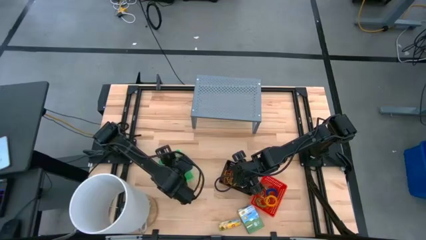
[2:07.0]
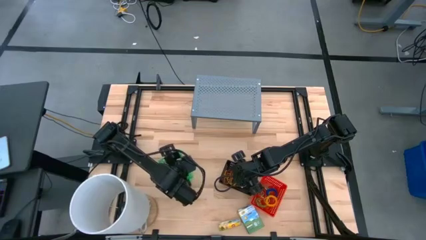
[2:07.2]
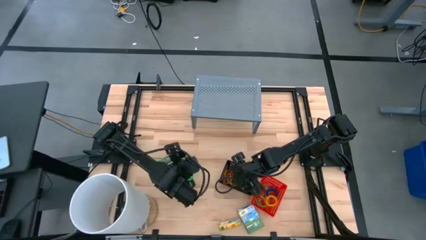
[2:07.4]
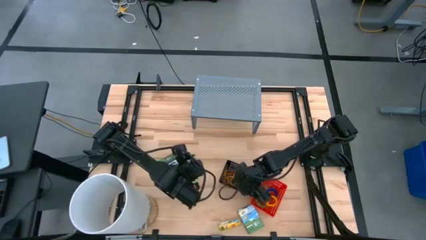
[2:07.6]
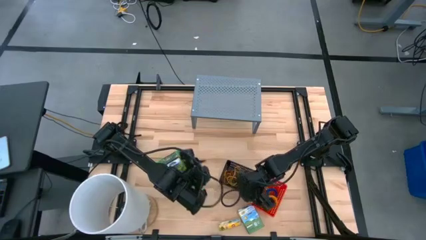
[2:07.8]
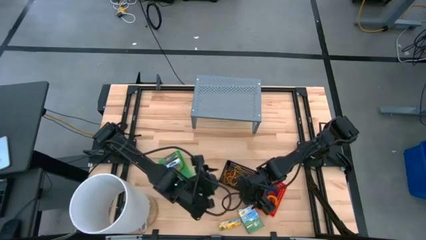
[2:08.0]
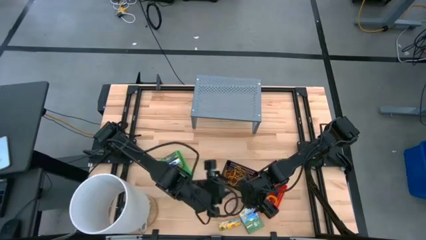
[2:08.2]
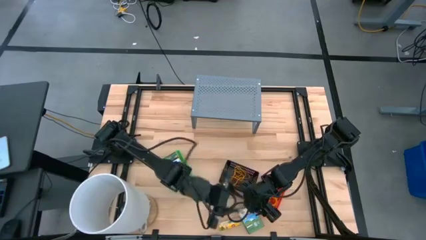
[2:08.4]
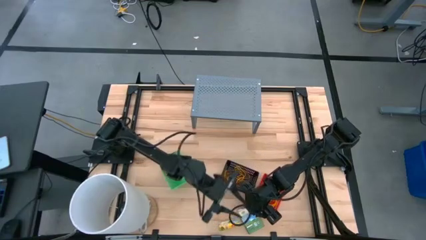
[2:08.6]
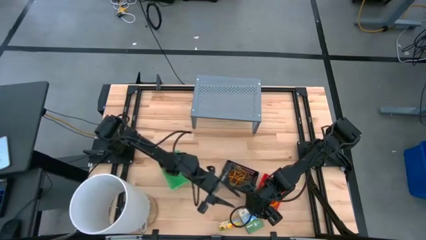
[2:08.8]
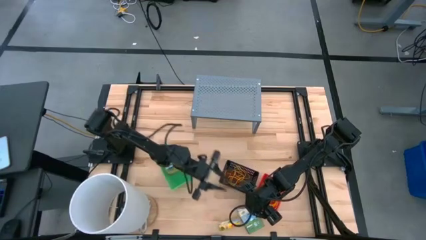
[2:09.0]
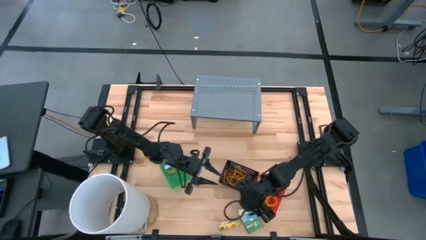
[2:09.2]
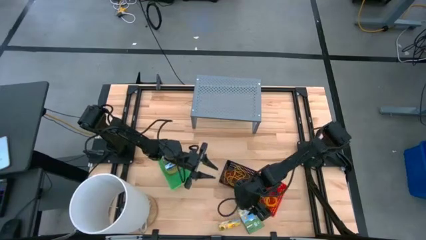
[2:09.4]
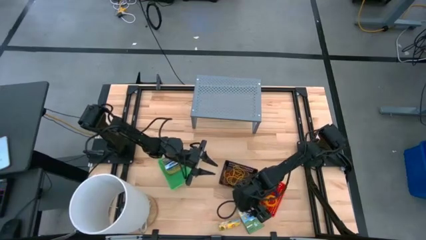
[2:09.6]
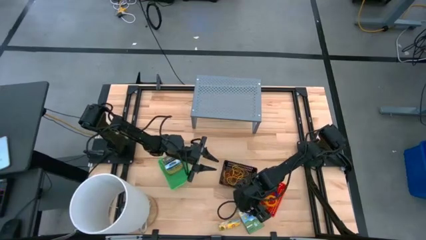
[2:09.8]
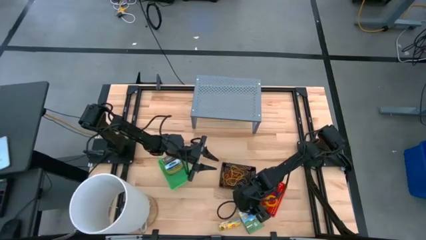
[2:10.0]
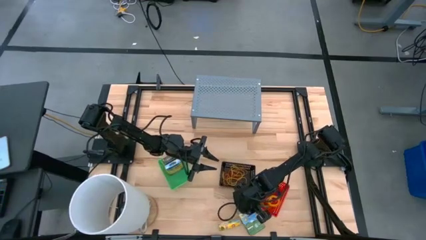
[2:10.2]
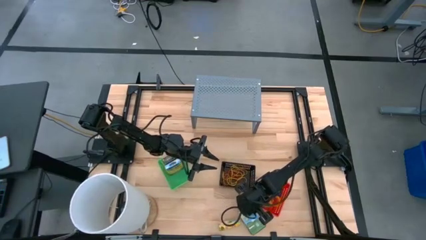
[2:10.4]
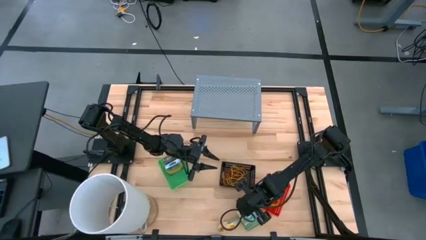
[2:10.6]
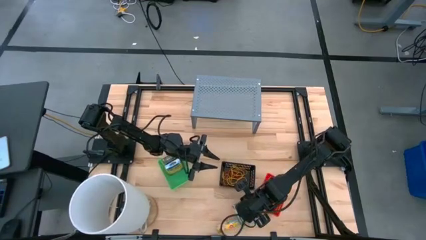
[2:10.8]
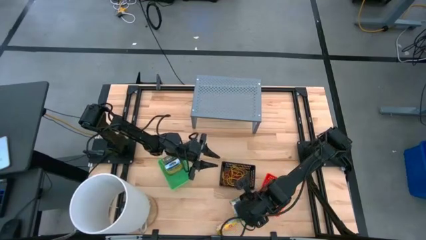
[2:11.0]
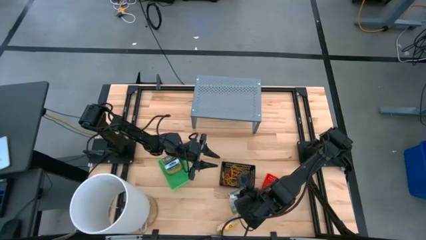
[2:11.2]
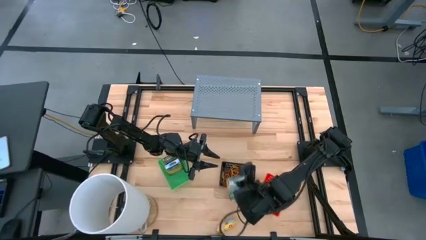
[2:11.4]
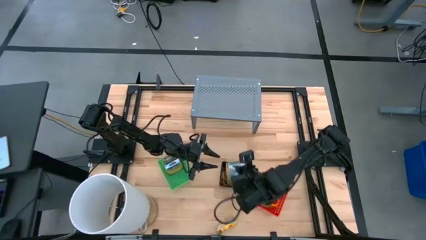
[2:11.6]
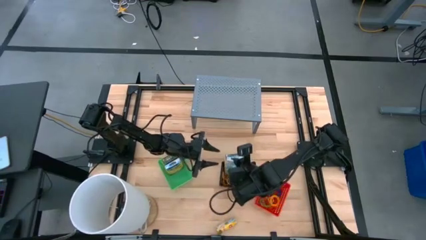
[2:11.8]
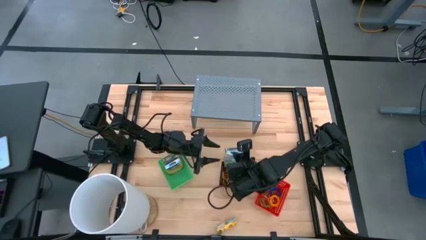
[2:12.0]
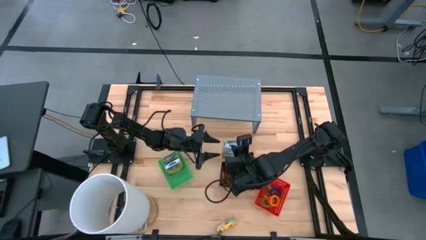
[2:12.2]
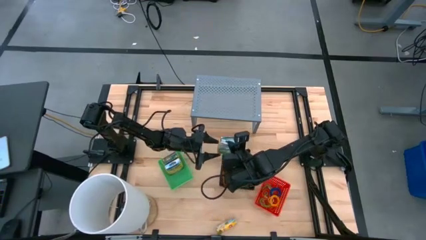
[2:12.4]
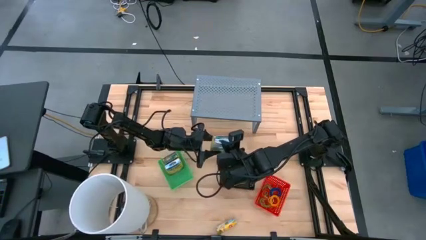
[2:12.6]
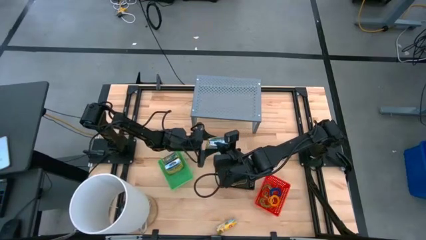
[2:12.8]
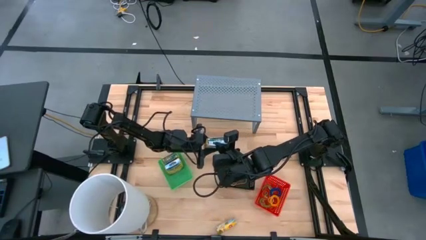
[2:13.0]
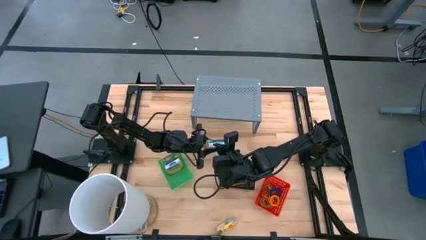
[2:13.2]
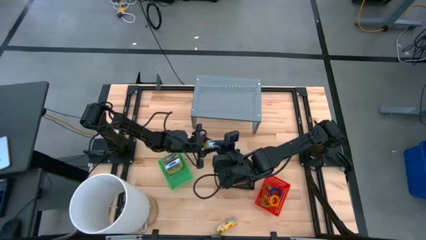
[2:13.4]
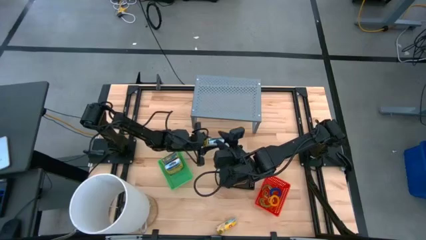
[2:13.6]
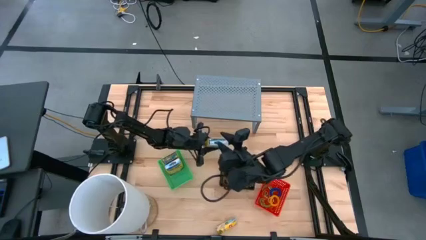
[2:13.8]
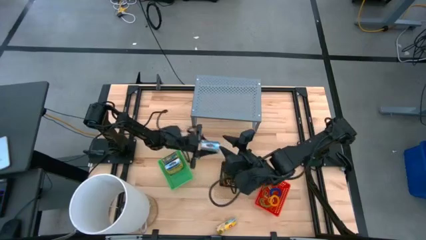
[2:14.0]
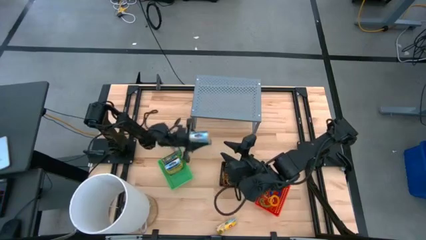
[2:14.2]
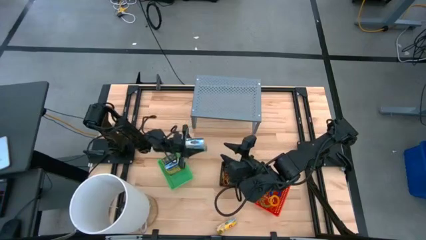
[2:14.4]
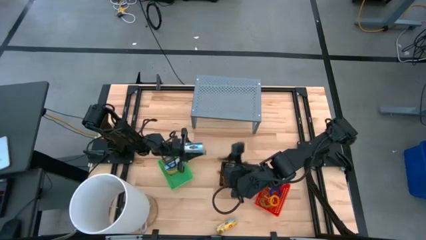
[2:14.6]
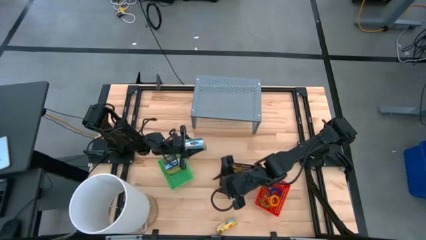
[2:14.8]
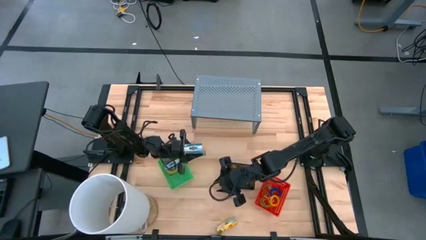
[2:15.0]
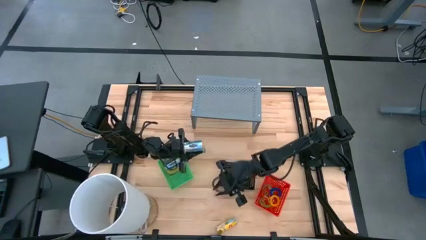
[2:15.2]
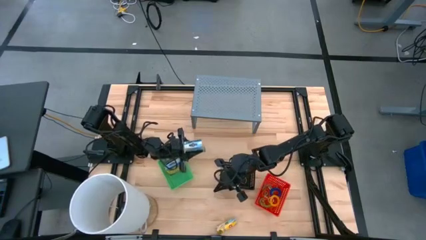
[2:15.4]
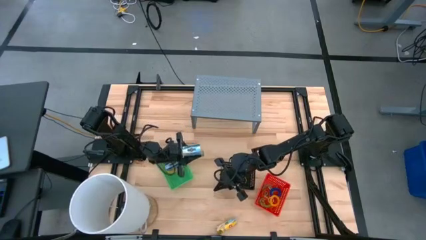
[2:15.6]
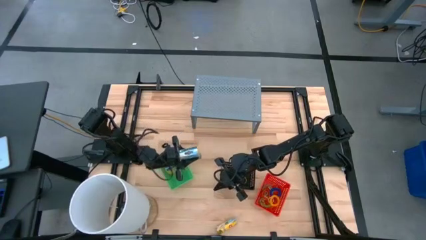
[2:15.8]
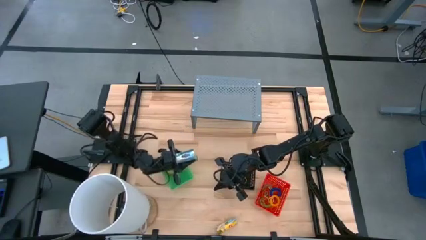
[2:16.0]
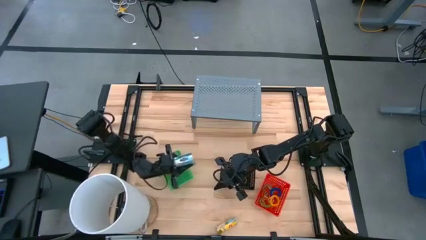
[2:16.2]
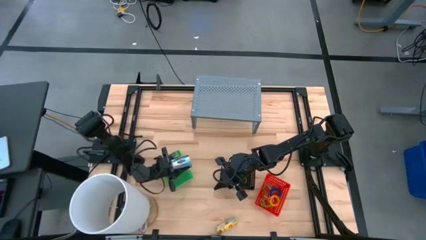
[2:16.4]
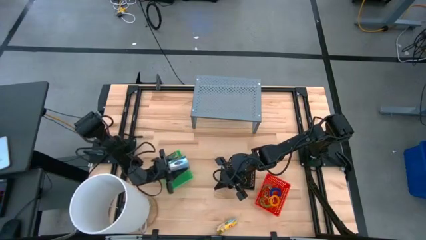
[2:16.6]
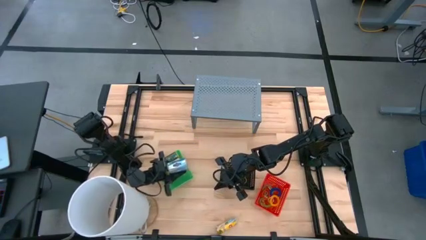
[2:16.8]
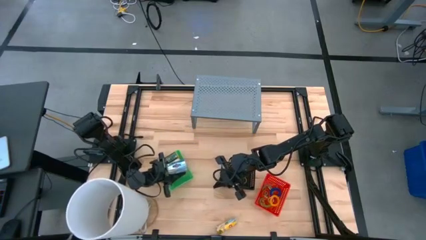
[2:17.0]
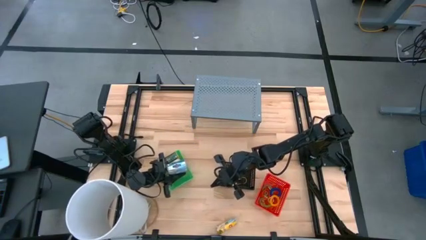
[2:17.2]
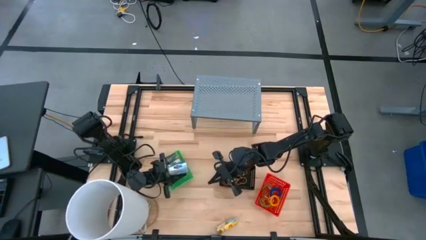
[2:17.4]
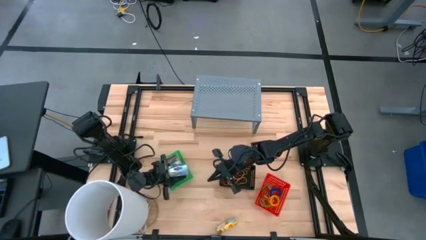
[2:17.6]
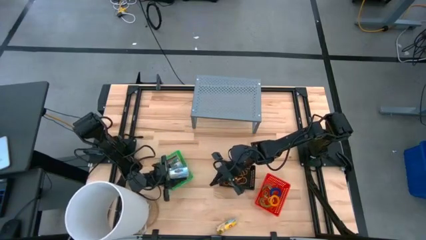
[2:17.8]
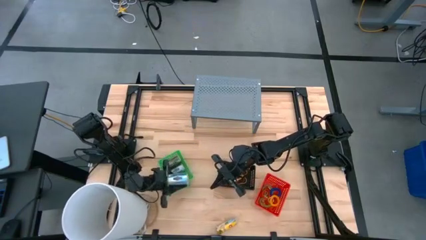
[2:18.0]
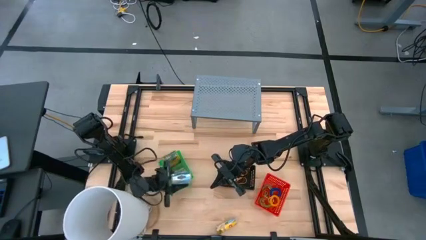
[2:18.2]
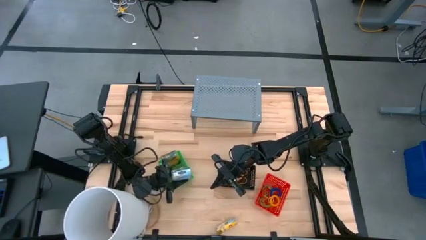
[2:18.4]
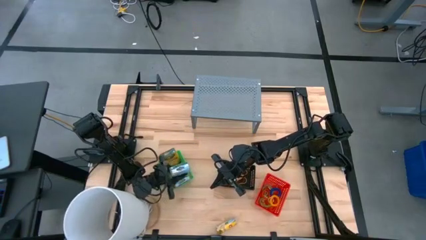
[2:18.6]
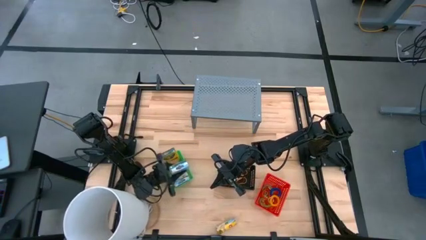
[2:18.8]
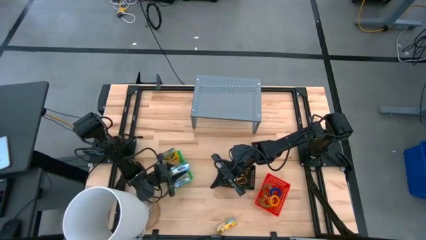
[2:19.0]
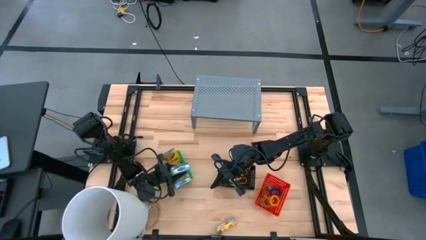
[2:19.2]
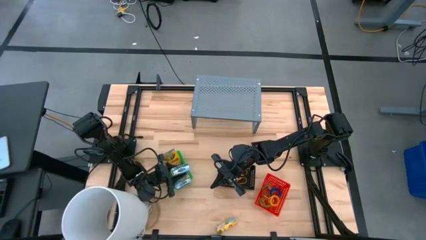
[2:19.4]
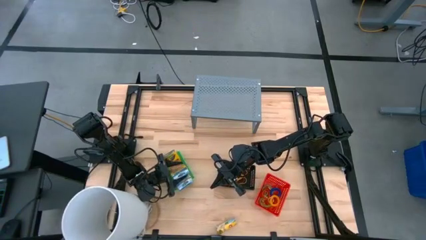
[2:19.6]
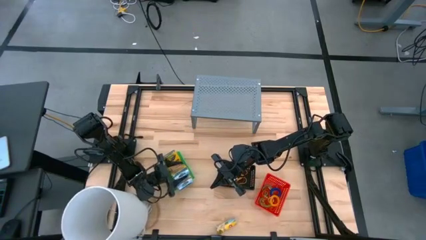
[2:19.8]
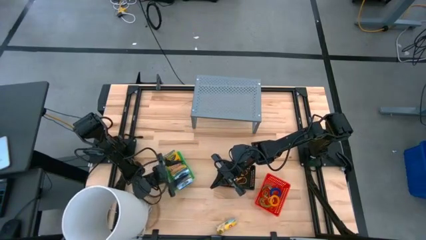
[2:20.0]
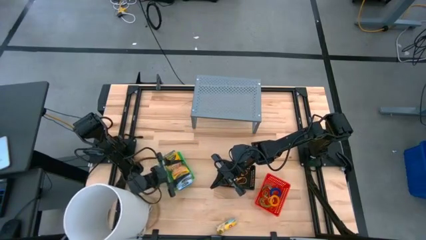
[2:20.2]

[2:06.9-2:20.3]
Task: Pick & Place Office Desk Supplies
Put the yellow crayon box into the green bin

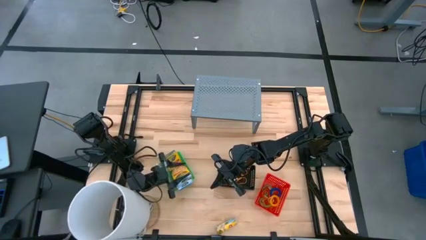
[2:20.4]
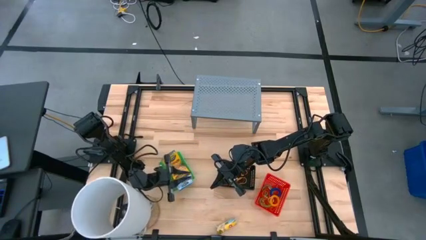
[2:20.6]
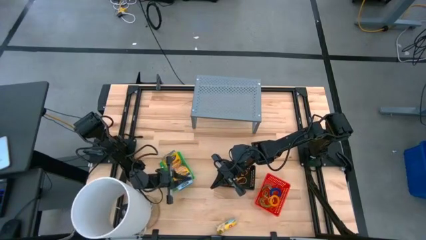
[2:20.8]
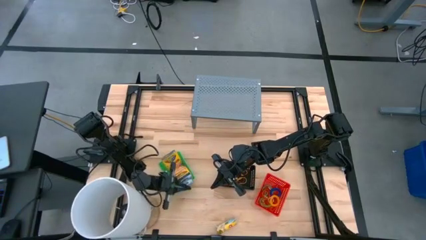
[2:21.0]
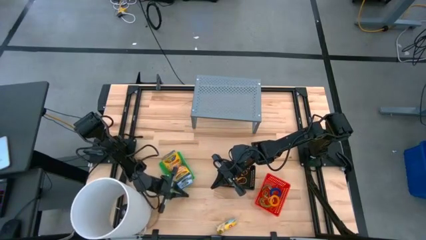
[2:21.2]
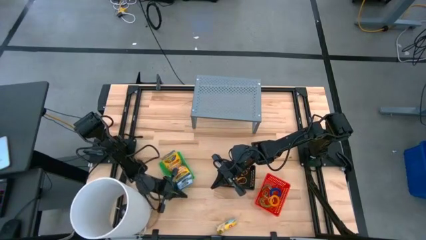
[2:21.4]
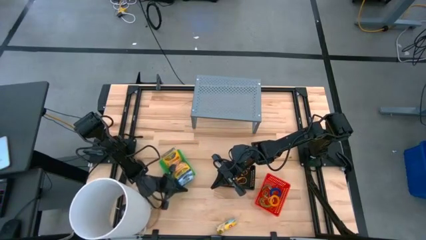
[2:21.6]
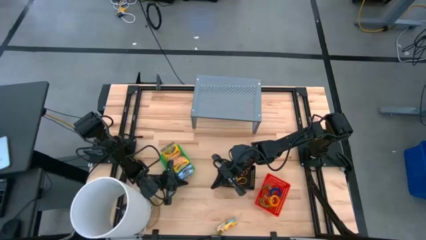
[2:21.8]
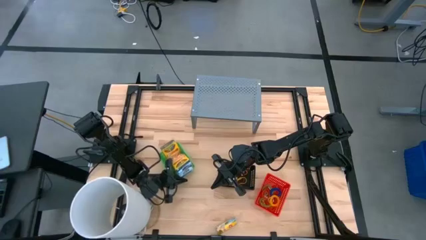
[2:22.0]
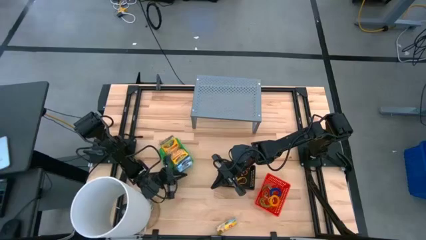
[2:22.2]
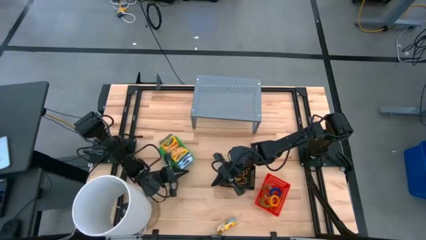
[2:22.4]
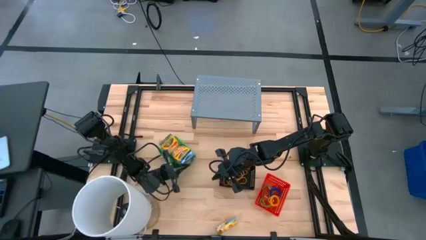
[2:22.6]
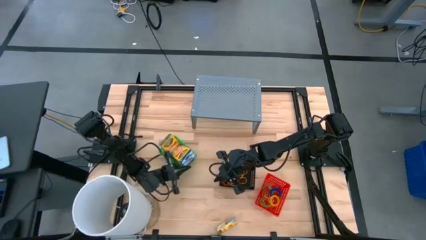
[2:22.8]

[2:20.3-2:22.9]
Adjust the green bin

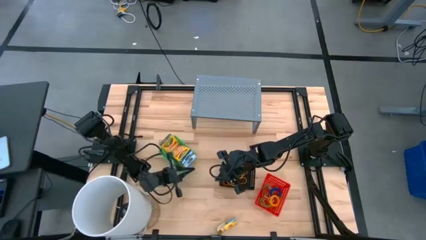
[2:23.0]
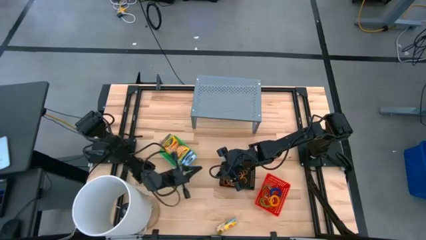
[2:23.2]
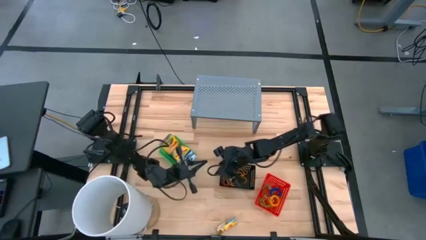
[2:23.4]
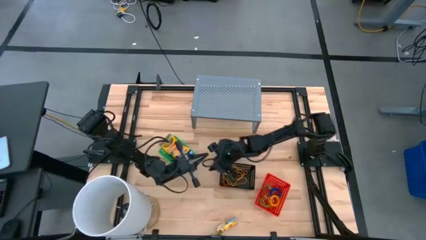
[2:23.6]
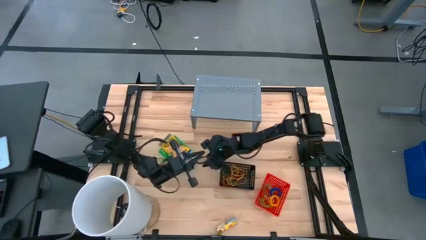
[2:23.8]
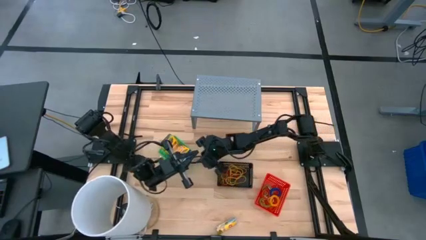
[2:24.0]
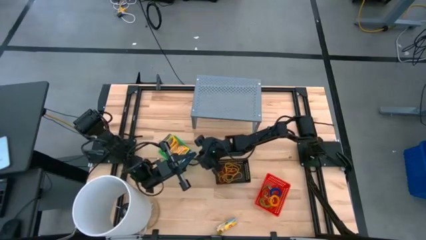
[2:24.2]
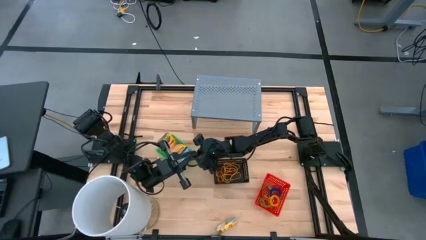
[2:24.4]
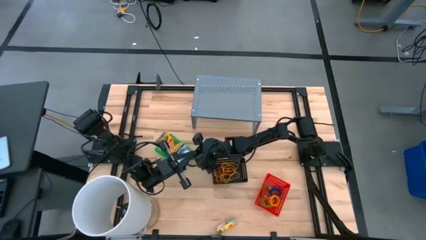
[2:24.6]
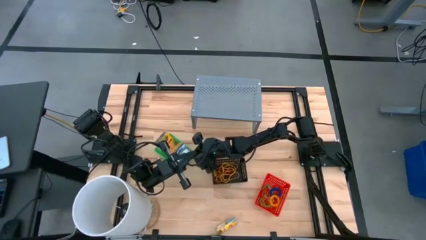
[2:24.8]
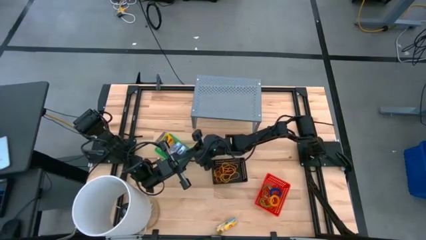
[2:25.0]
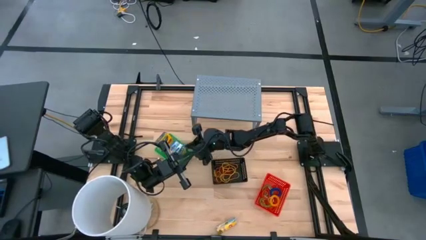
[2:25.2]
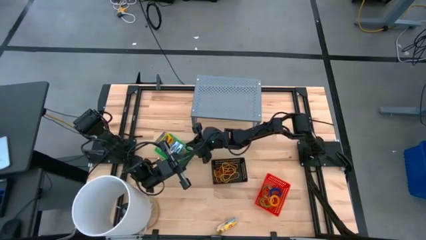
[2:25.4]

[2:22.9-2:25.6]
Adjust the yellow crayon boxes in the green bin
